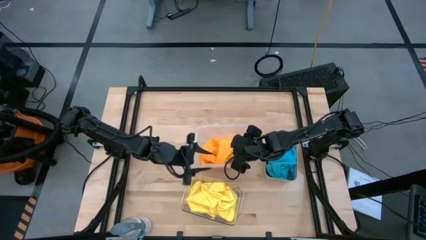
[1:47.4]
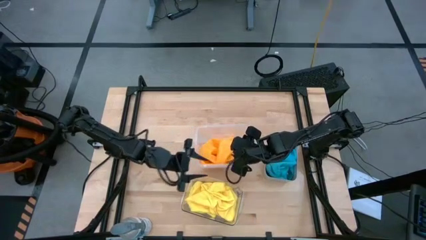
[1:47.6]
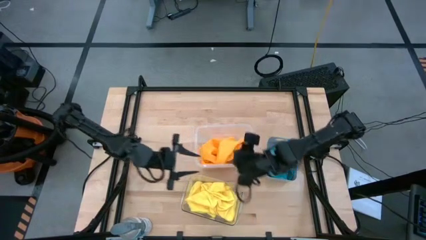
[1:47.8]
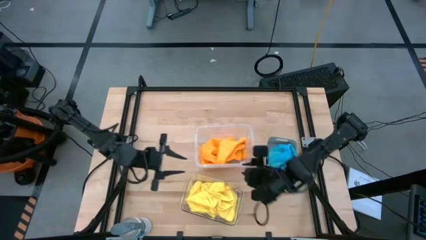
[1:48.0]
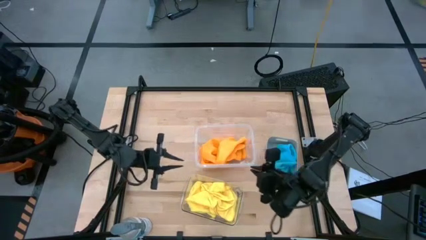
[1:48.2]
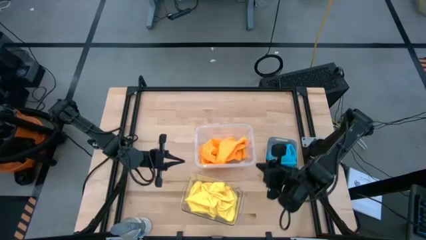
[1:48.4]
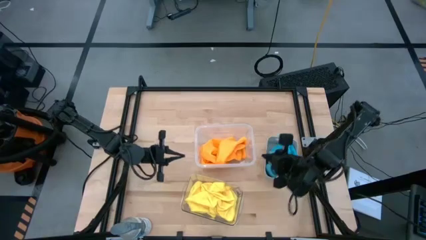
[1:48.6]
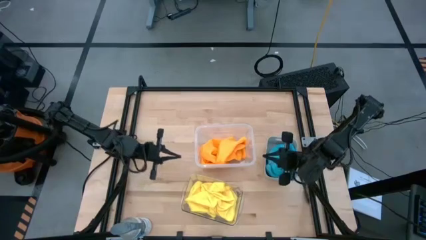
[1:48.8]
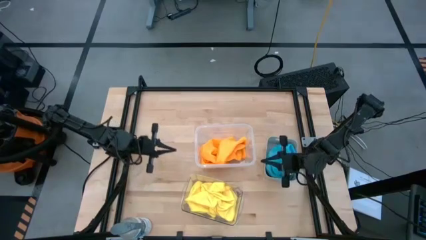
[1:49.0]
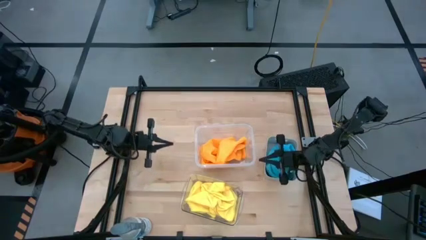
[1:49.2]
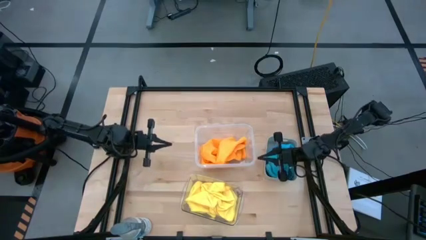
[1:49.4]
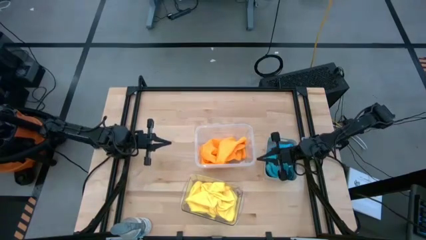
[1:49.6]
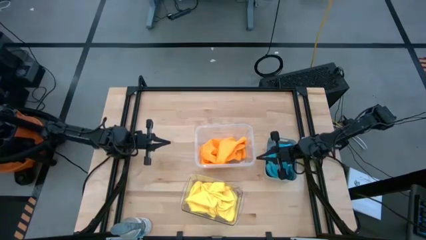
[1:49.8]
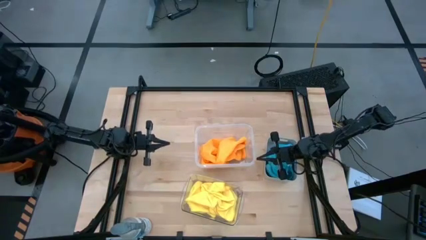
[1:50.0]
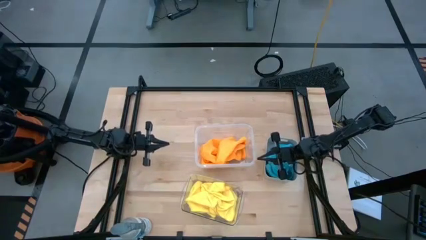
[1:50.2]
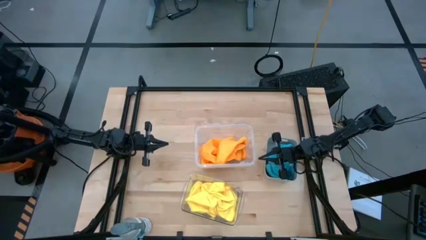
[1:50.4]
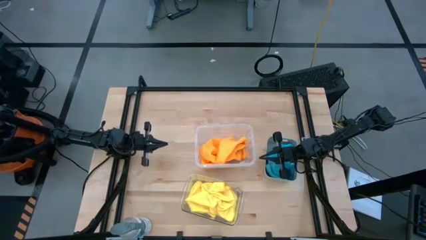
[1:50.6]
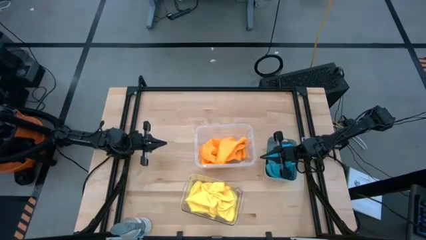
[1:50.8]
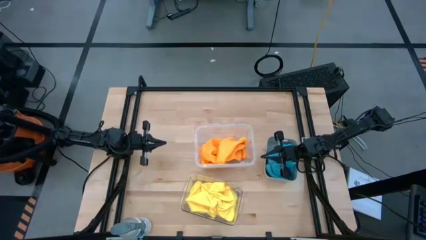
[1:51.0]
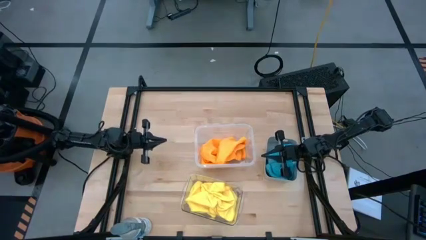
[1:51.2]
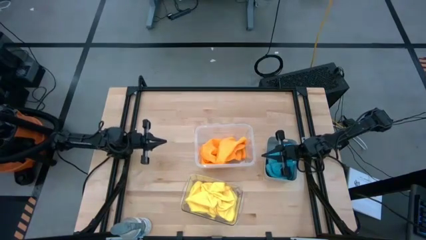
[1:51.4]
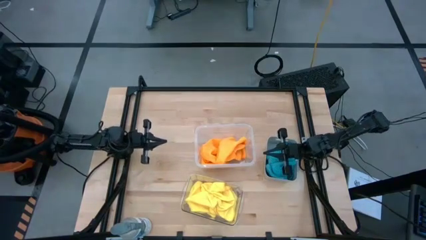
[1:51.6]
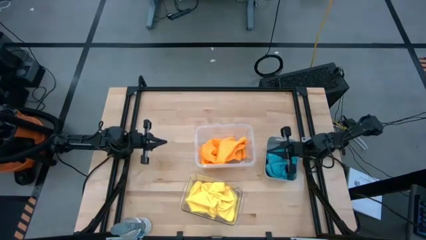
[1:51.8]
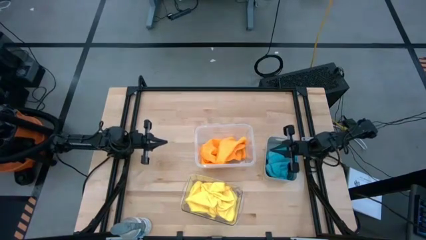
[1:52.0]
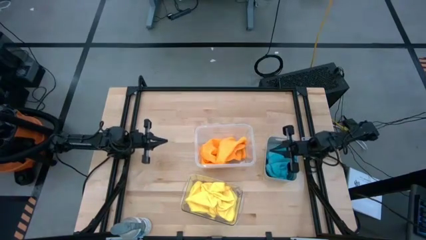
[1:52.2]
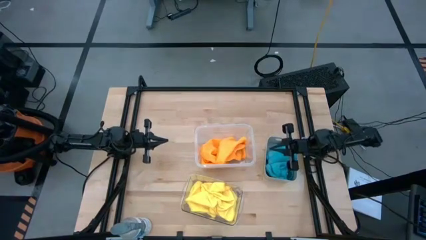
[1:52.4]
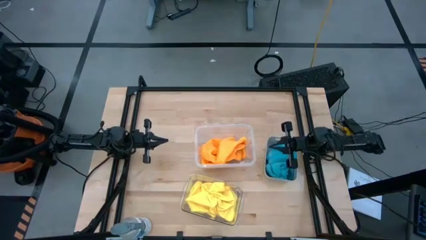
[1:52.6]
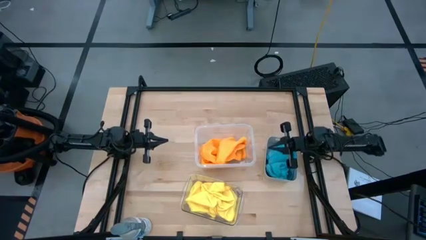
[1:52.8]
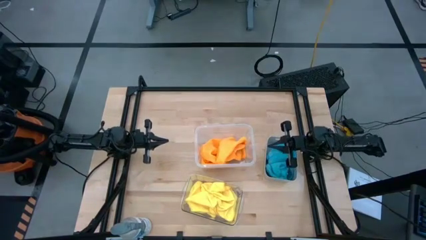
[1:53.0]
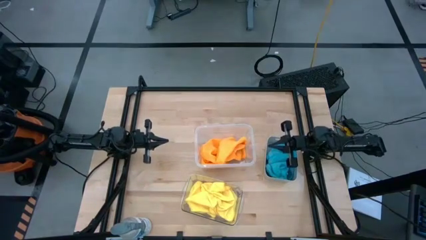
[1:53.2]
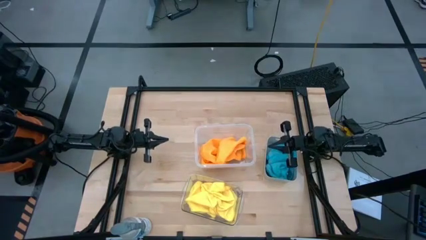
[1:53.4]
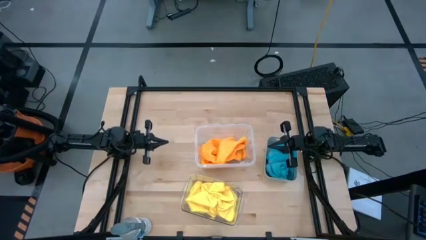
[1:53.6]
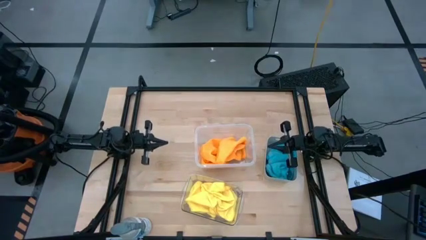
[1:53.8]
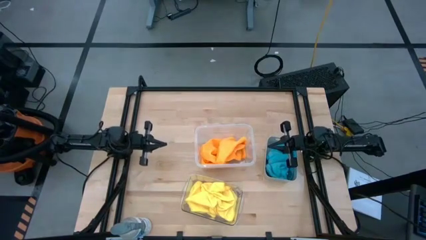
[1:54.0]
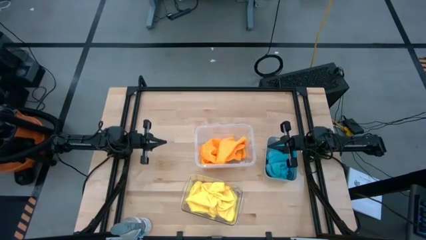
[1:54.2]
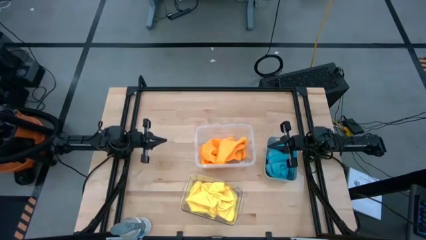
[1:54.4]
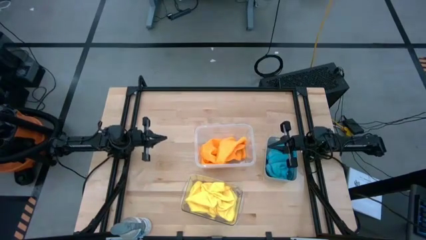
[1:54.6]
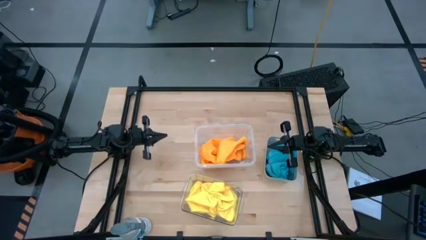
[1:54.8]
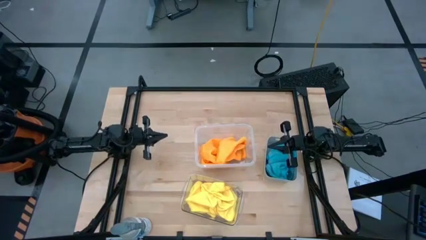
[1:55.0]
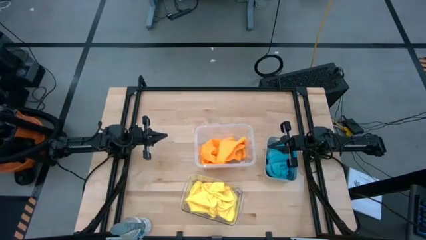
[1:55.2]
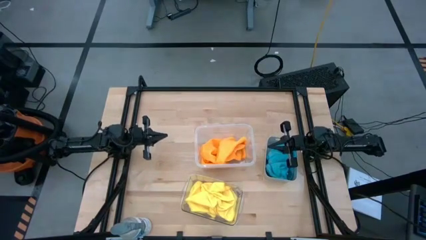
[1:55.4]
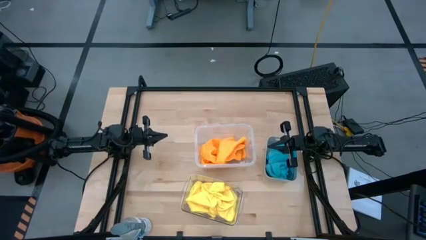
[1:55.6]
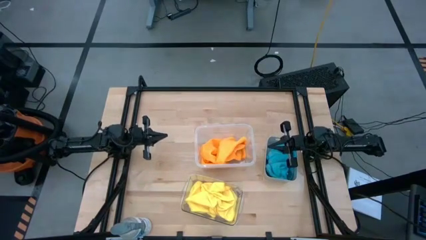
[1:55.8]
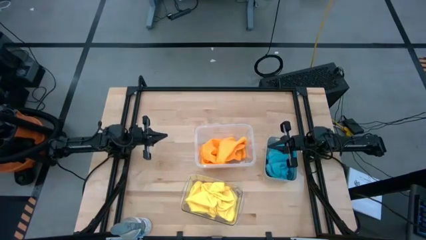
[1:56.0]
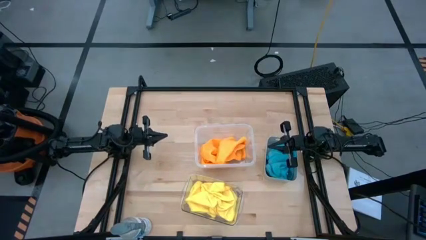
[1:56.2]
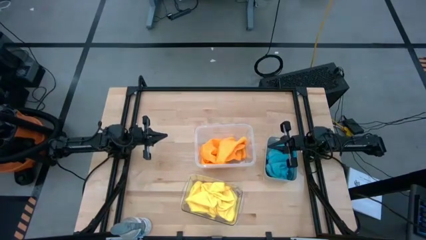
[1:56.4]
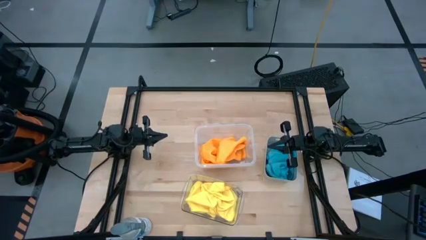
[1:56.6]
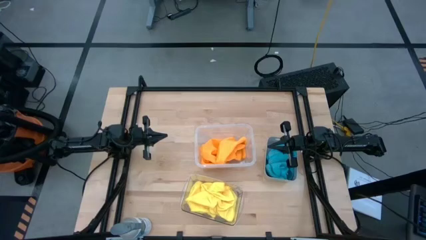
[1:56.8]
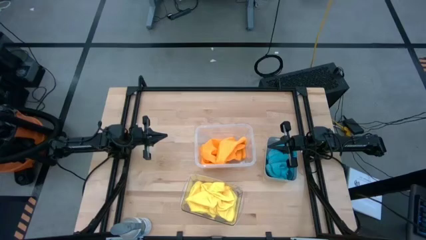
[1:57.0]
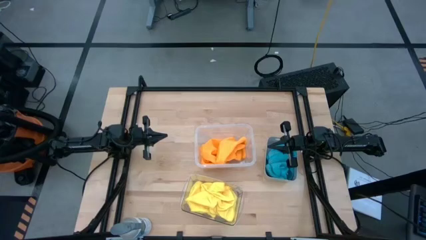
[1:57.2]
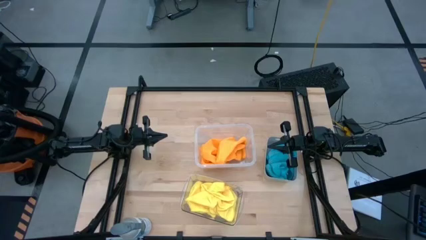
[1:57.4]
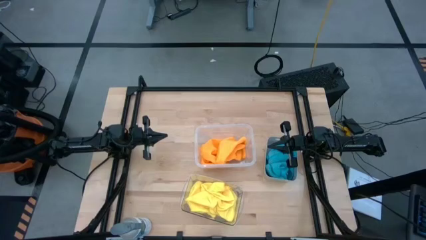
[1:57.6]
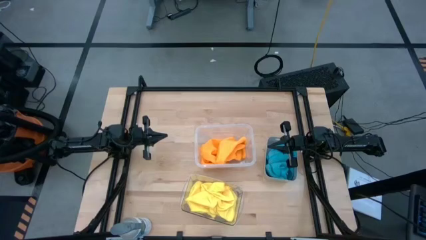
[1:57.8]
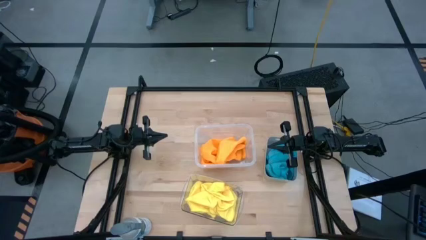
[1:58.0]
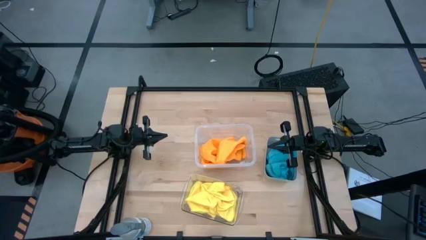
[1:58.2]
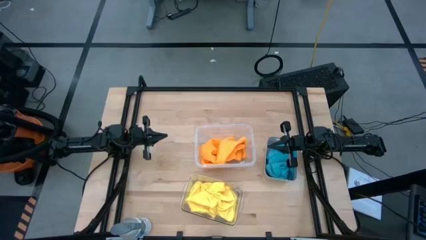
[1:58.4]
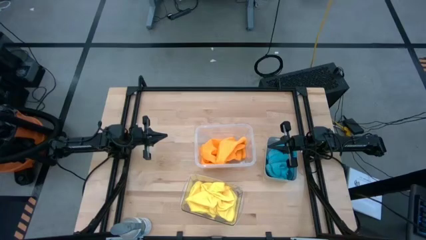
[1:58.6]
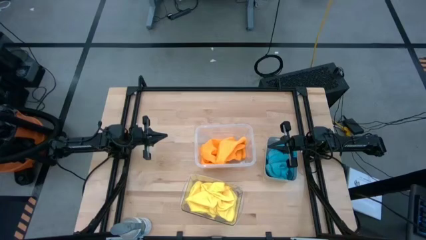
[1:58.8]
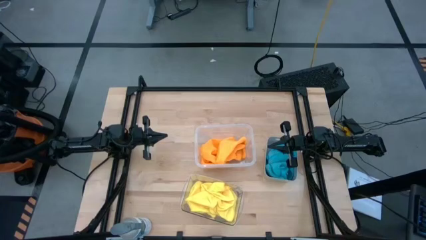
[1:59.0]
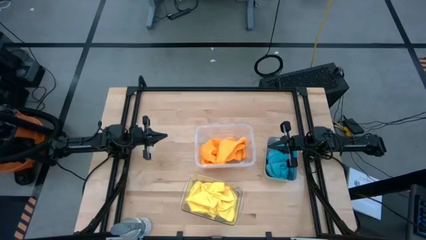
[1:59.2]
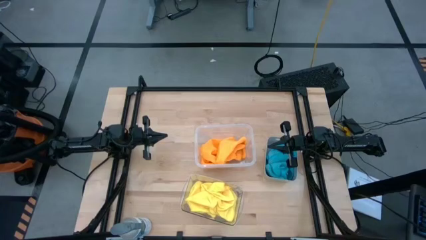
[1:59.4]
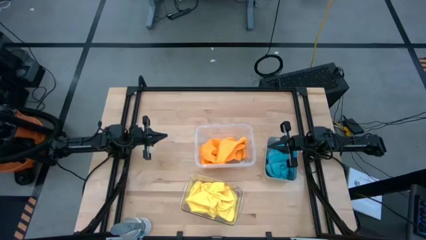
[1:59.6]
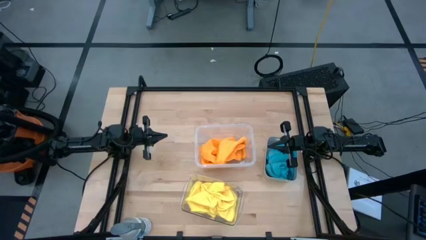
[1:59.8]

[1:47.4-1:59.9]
Task: Sort microfiber towel by color & place in baskets
Return to Home Position

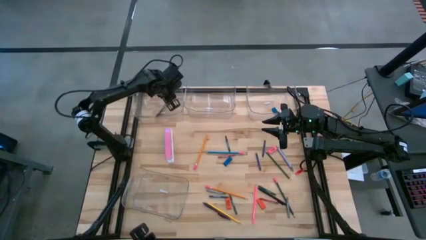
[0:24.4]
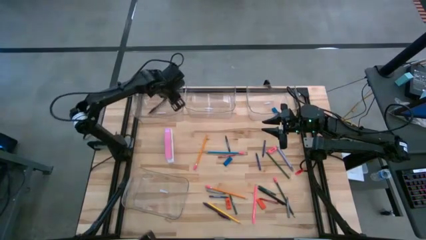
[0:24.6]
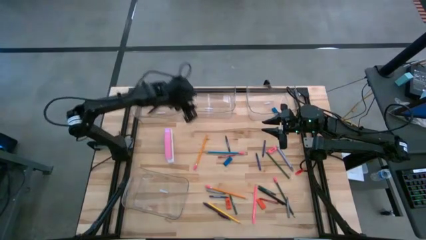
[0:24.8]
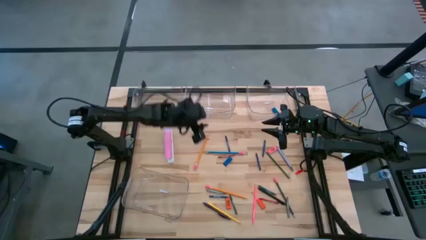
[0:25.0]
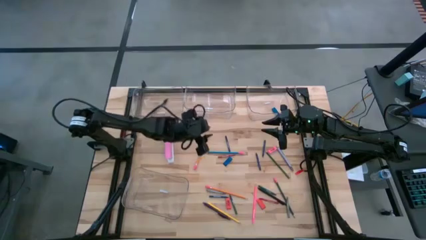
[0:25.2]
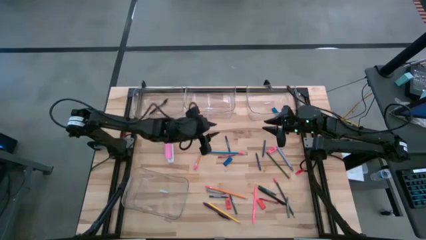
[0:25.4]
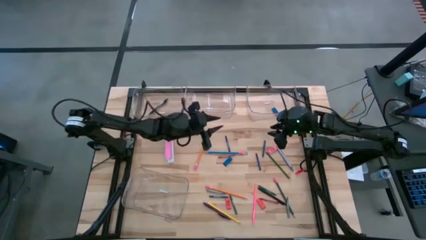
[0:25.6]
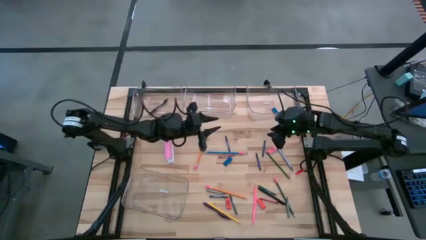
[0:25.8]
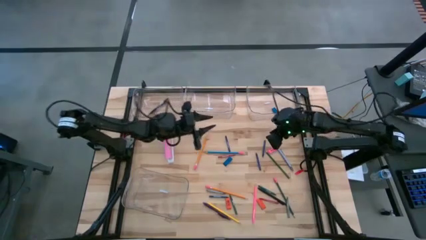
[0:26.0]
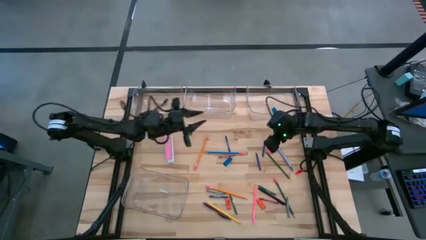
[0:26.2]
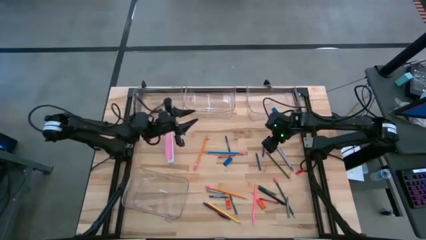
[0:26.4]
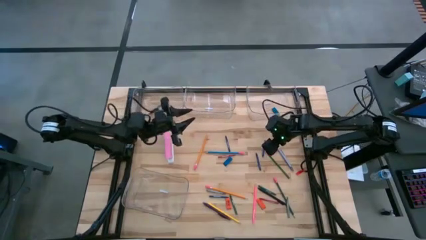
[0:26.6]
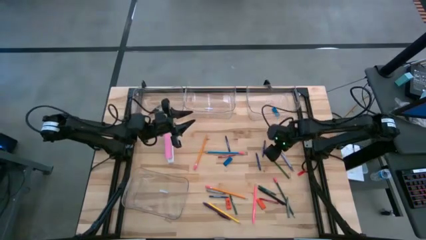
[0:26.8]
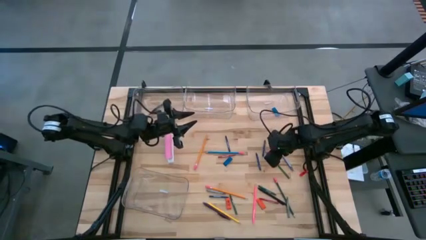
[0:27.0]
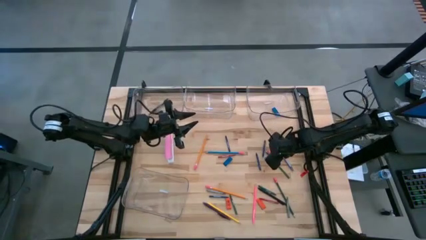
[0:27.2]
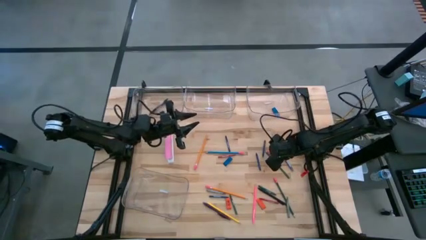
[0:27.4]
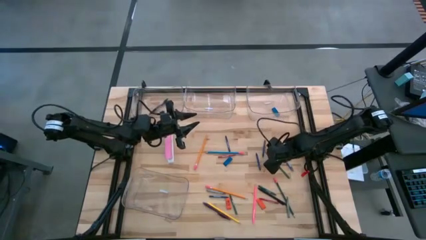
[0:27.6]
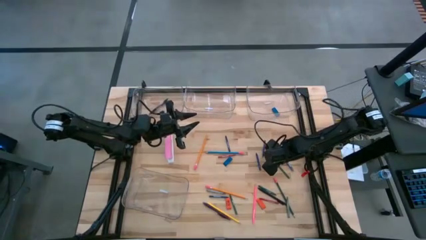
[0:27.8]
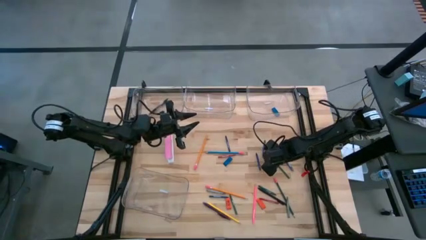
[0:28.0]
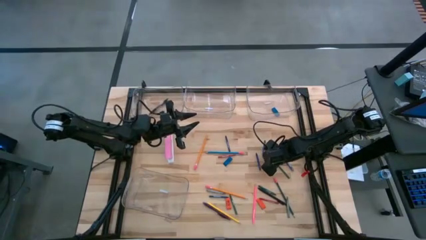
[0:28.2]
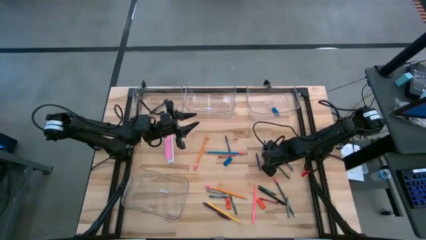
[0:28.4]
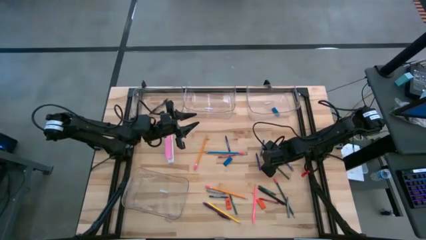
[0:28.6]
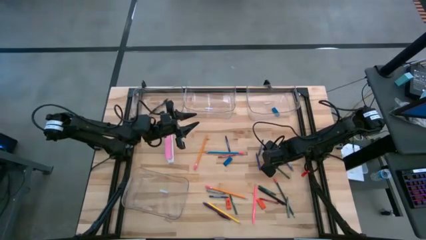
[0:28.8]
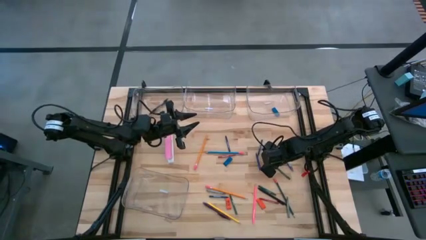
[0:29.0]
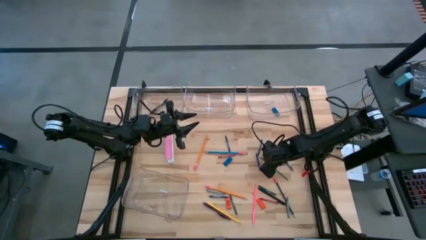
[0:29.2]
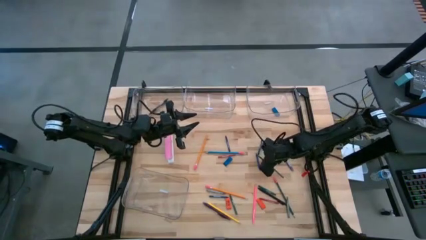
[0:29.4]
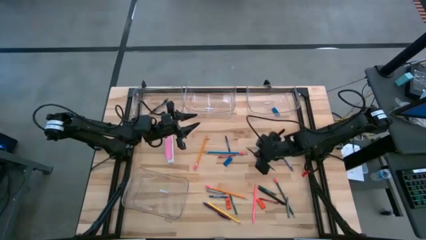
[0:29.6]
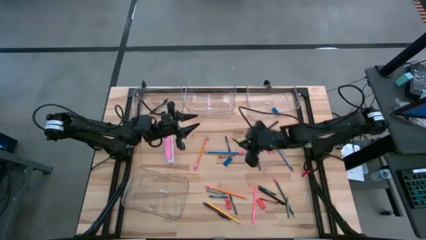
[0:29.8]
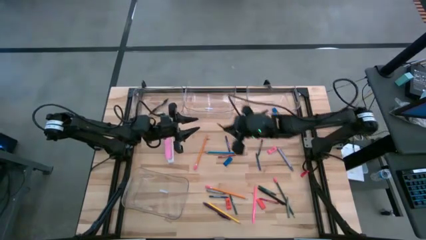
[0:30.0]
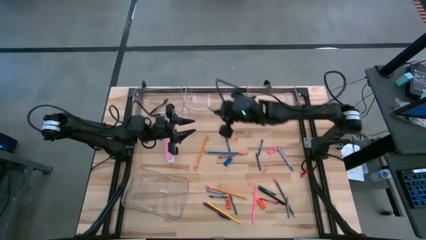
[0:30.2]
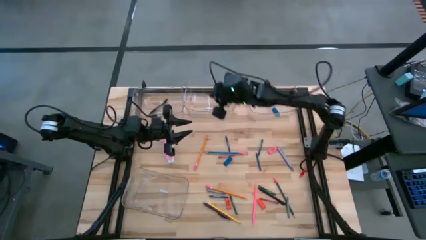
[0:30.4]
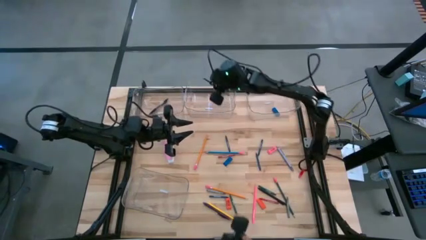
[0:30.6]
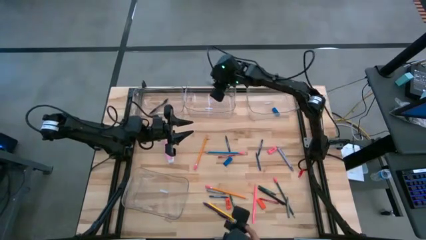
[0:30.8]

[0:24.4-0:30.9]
Task: Sort crayons/erasers/pens/pencils in bins
Put the green pencil into the top middle transparent bin
